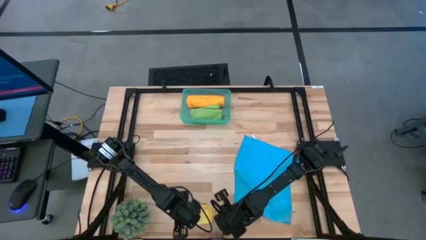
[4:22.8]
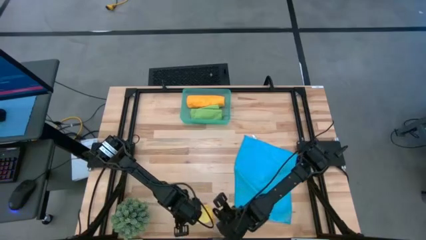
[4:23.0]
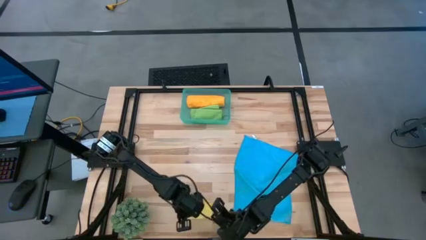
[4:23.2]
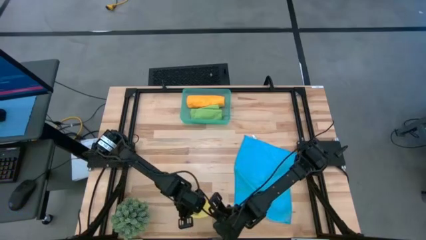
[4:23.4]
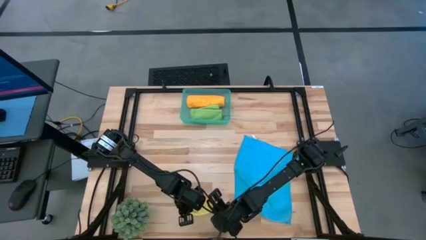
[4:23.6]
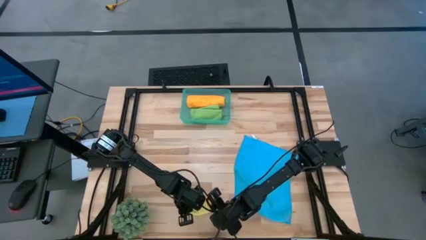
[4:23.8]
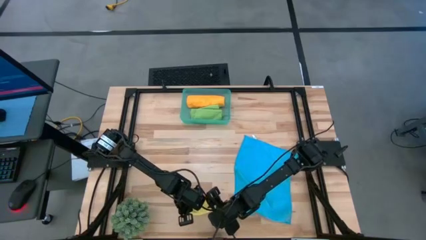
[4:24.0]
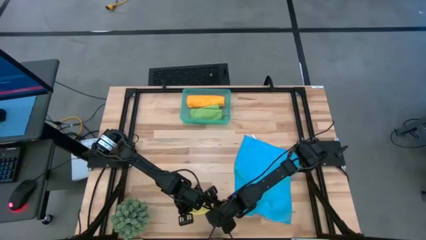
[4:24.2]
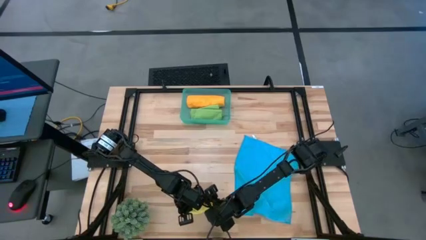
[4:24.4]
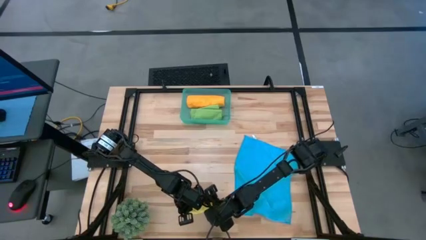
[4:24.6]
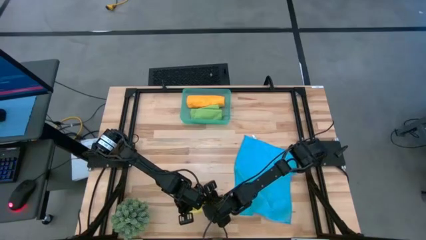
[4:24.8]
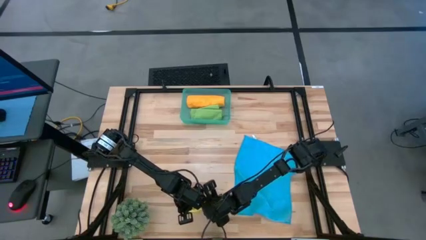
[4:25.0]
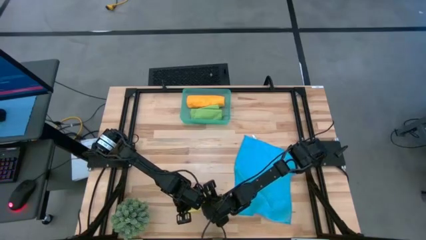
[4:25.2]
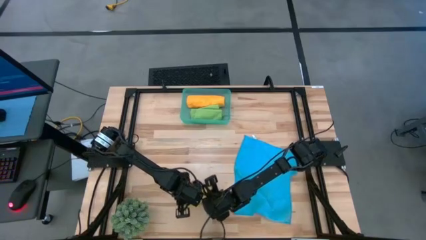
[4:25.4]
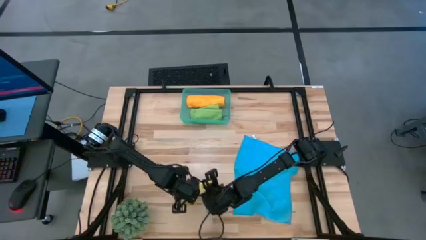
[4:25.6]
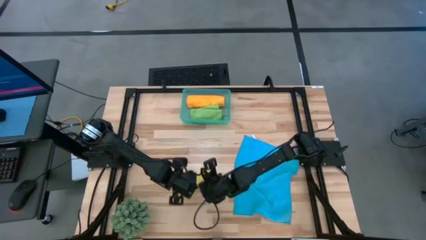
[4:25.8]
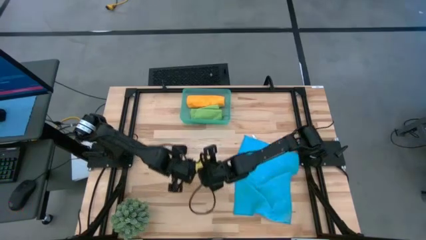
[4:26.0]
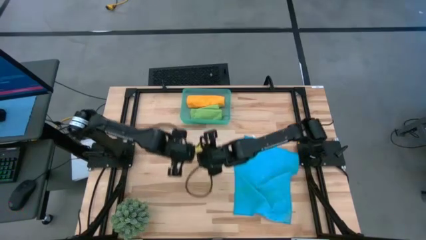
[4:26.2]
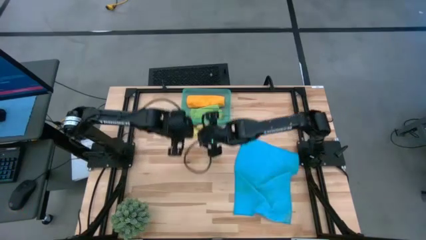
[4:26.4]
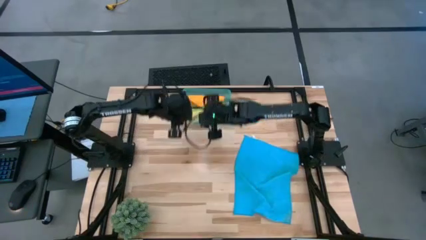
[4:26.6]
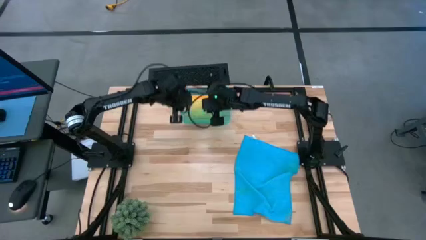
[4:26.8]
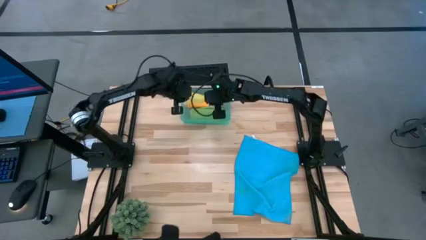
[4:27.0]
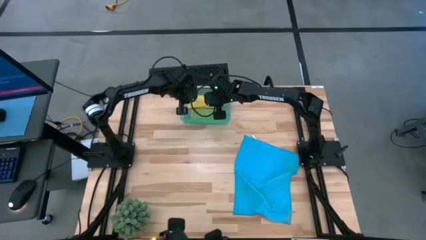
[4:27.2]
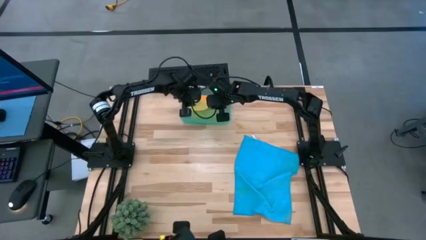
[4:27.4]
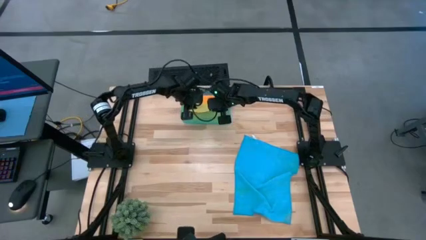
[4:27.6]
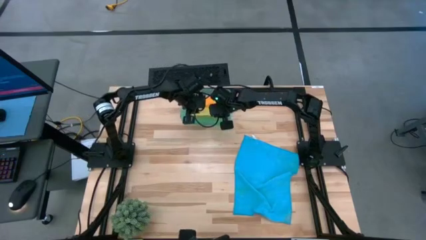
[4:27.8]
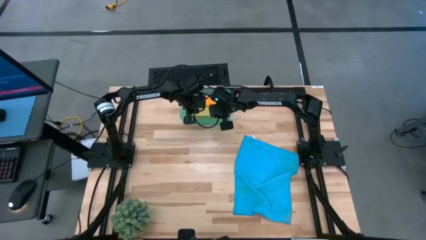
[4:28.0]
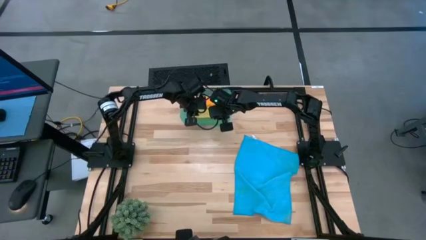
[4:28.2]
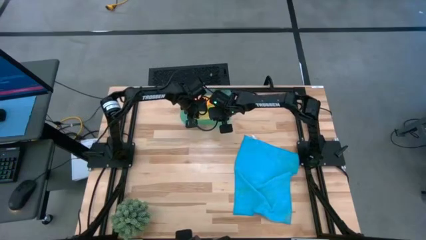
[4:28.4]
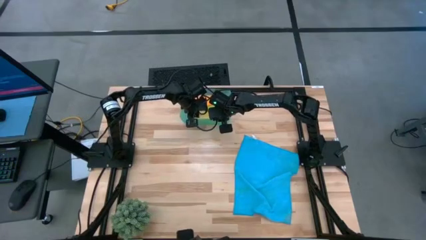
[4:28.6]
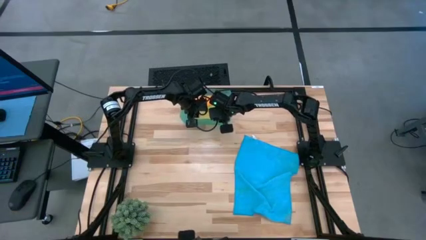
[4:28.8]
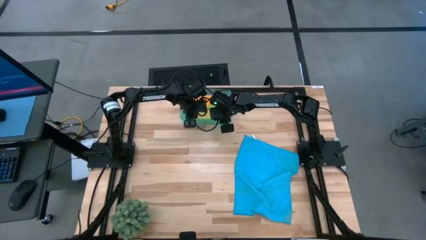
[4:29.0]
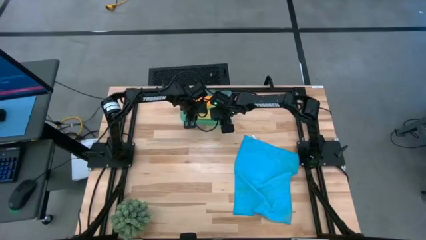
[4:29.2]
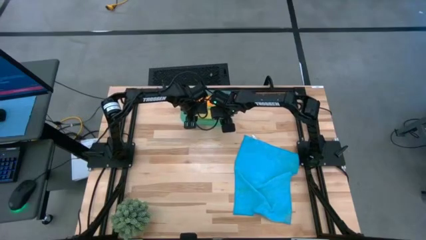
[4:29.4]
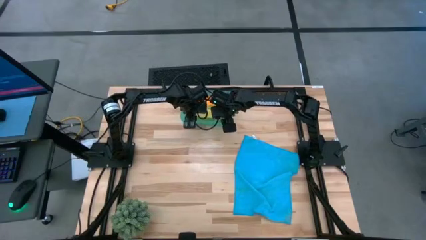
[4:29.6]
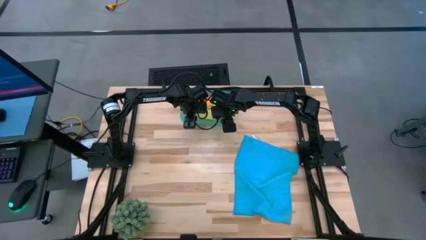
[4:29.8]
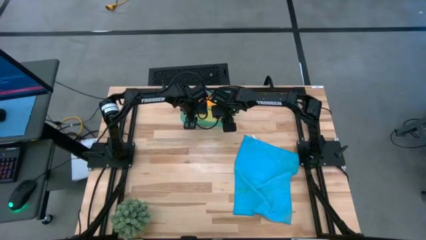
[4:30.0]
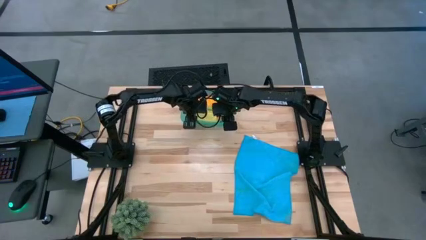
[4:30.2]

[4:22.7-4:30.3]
Task: Roll microfiber towels into tight, uniform cylinder then place into a basket
Put the yellow towel into the bin

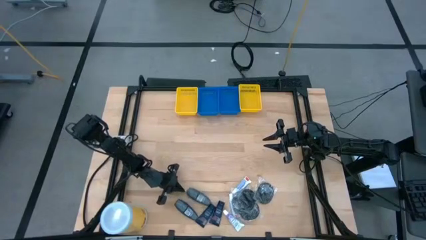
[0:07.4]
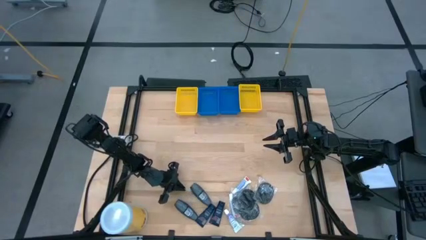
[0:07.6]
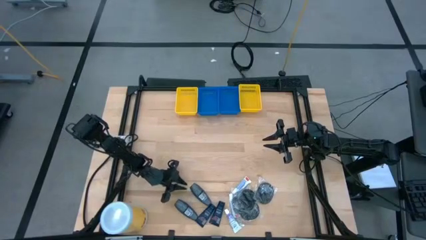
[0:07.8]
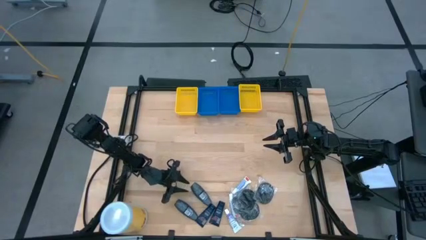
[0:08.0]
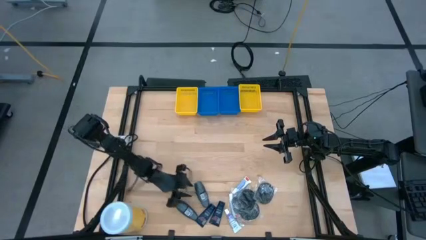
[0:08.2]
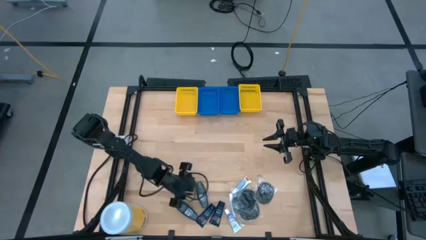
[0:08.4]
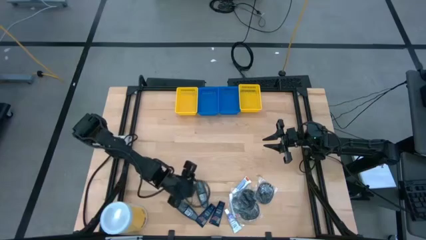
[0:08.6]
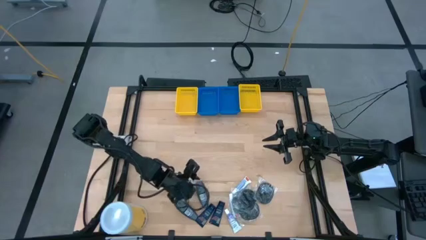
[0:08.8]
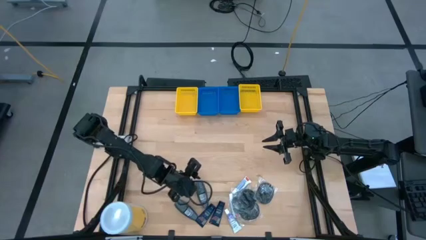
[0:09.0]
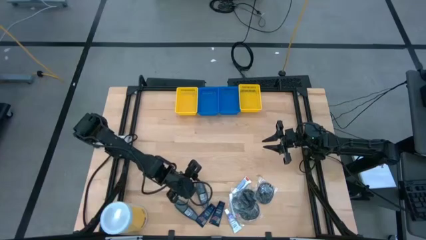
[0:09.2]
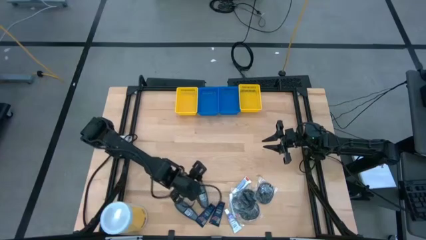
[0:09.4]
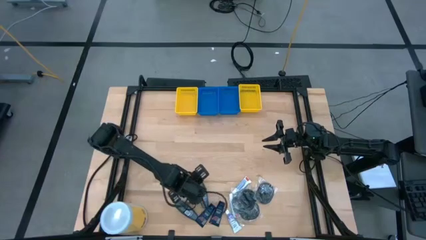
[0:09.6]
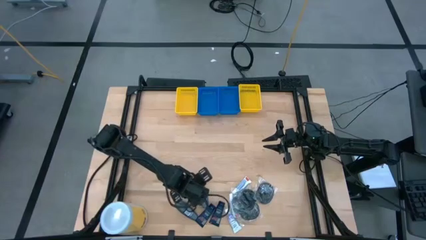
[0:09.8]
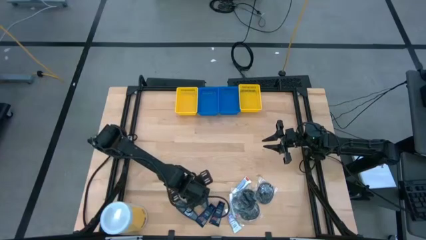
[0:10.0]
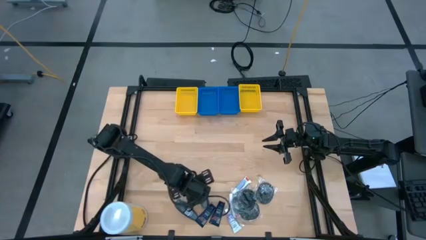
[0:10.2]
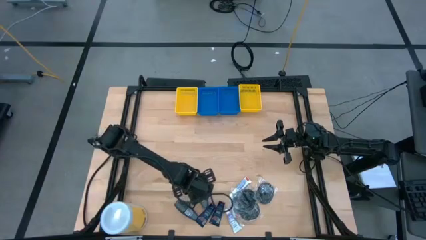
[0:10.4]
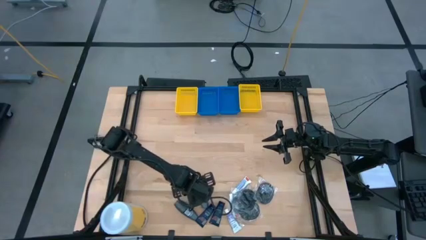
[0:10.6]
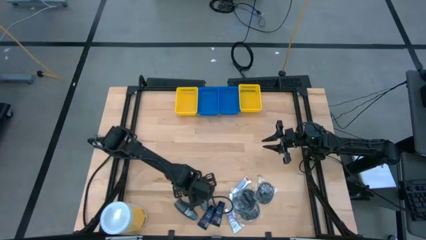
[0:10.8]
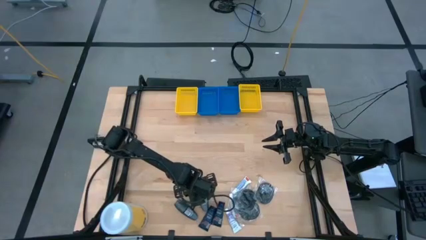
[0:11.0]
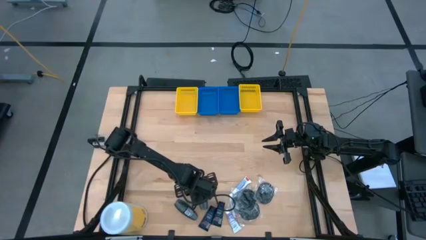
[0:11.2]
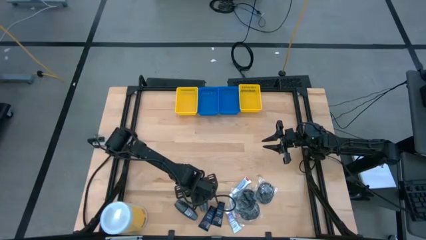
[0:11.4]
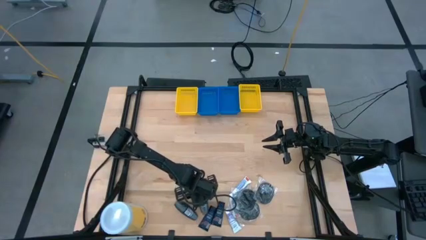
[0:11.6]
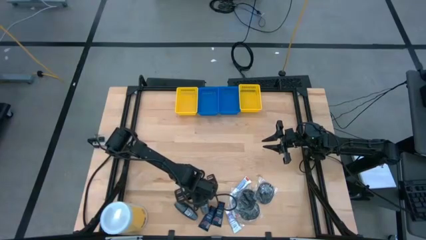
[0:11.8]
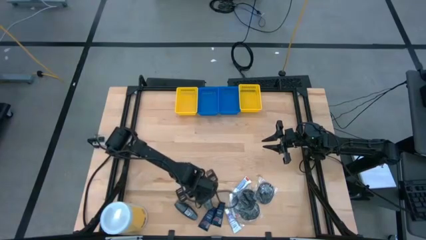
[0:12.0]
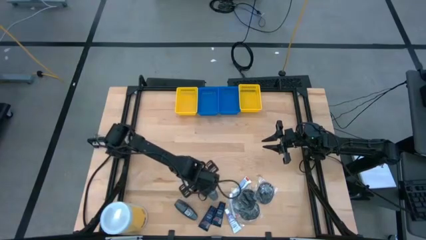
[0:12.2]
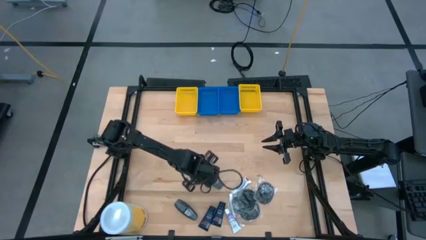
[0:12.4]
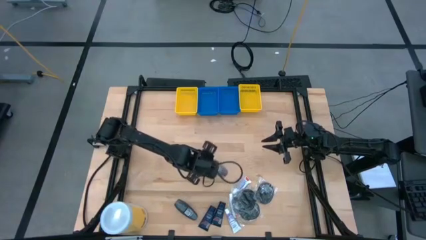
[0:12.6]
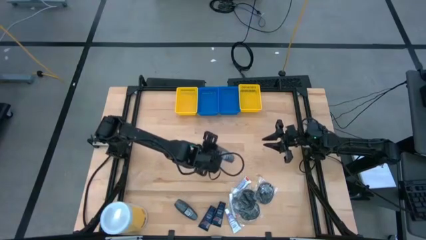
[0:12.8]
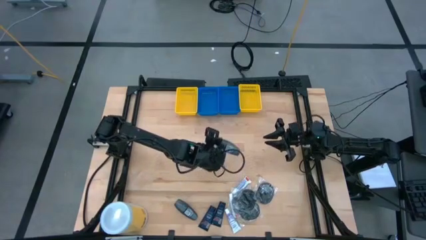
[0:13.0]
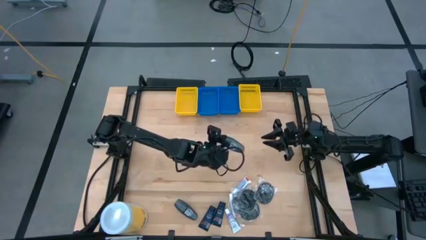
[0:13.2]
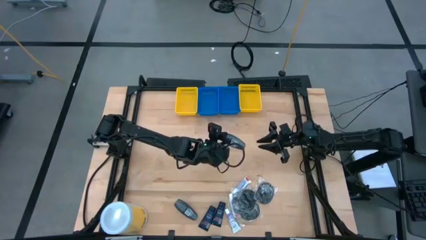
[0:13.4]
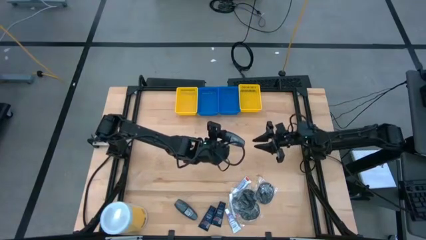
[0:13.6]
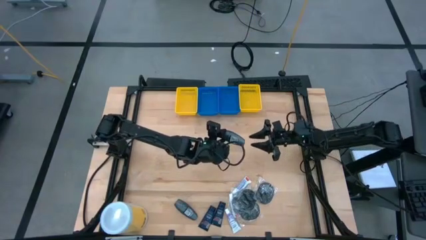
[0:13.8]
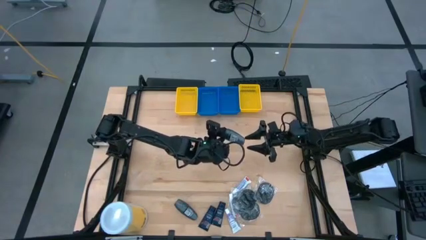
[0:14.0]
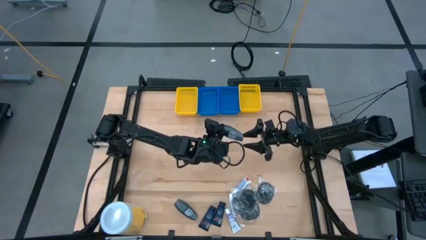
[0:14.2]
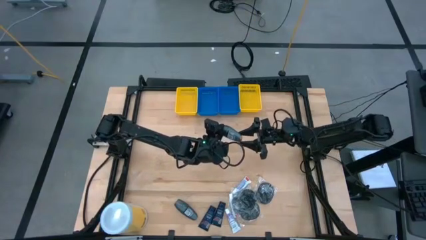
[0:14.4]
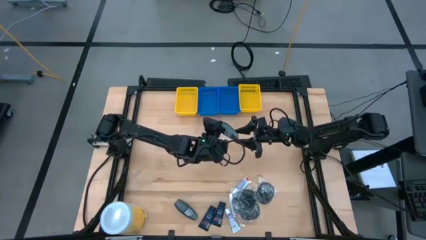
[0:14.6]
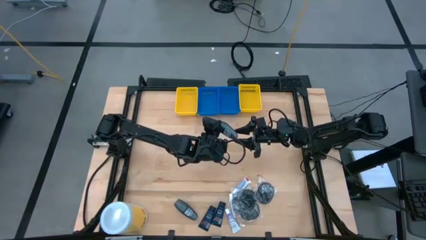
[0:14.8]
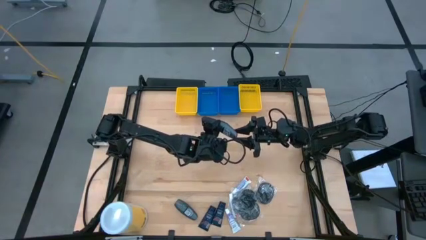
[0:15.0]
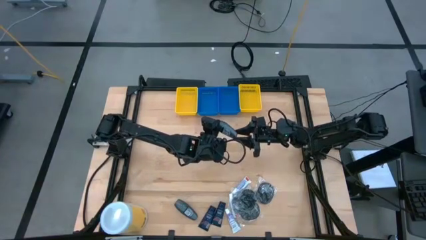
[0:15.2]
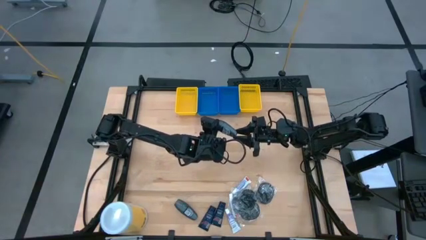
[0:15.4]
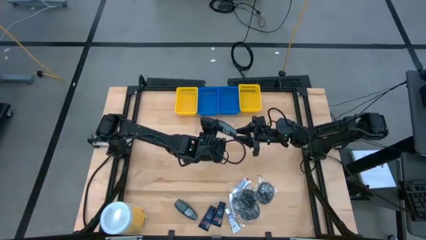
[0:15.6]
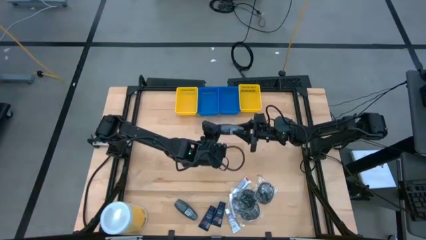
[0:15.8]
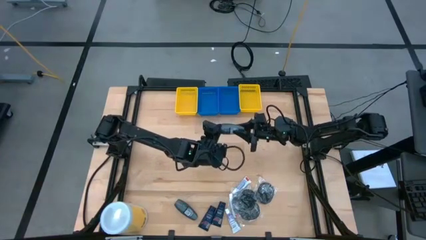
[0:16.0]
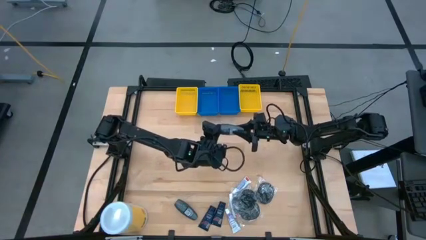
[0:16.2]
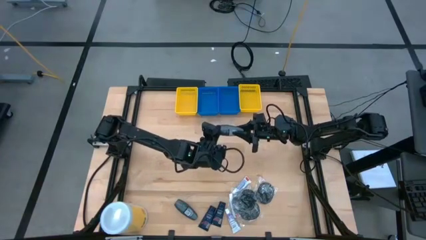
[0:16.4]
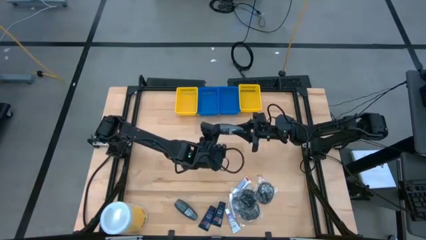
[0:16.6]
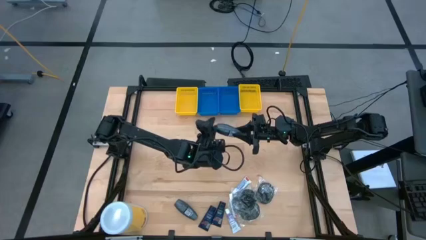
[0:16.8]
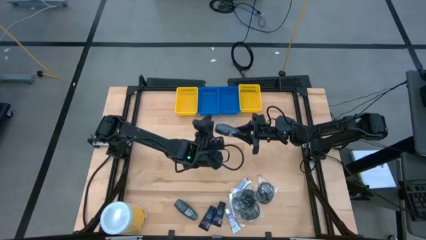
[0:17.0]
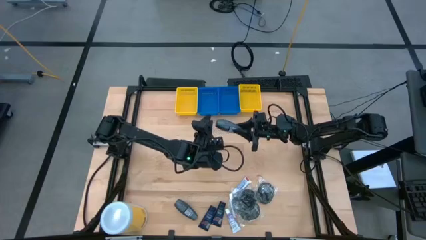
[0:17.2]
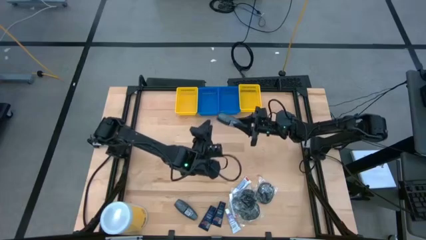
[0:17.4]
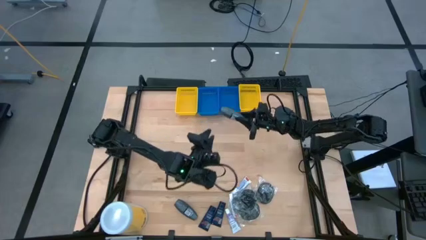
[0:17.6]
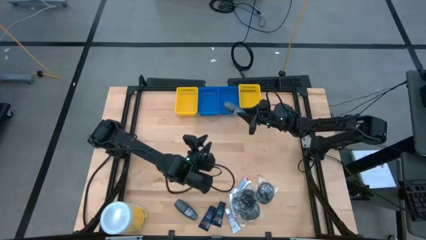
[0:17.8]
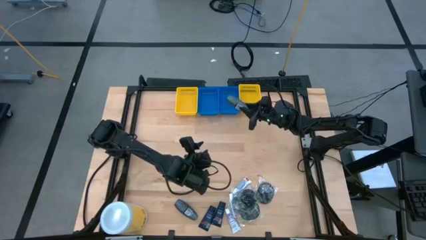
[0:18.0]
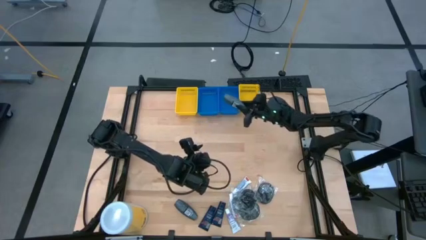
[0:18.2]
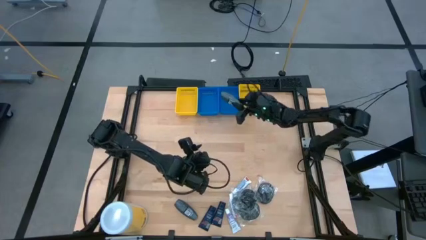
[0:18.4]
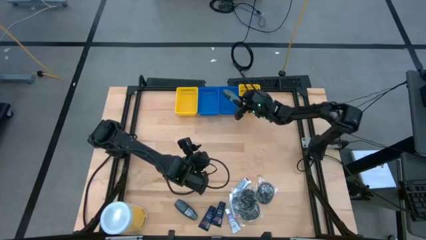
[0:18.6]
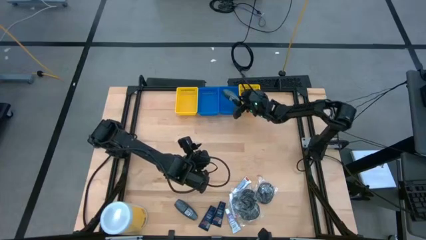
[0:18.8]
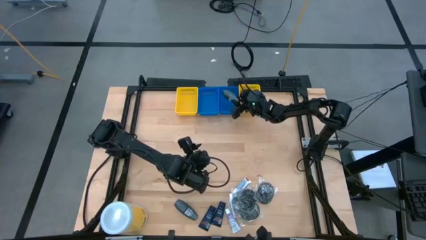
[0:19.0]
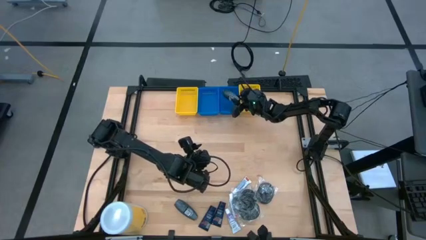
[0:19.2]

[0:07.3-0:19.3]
Task: Pick & Place Travel size toiletries
Put the top deodorant cream into the right blue bin
